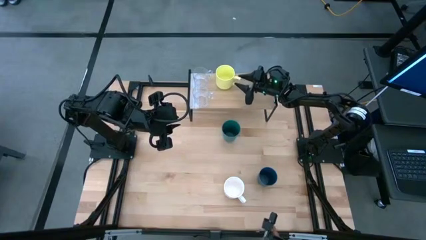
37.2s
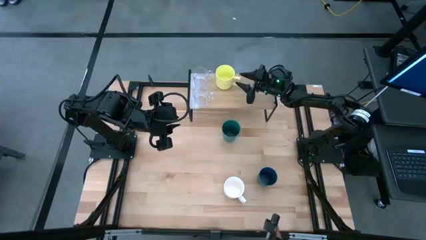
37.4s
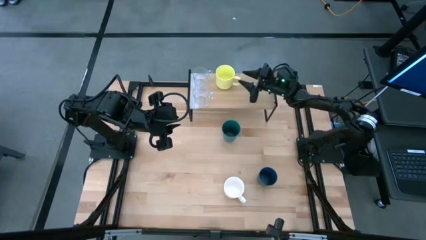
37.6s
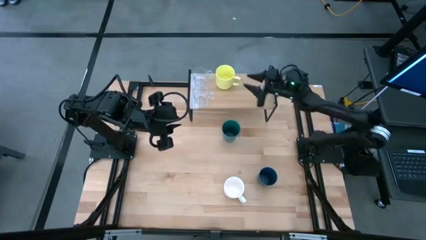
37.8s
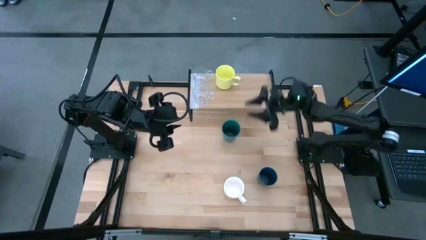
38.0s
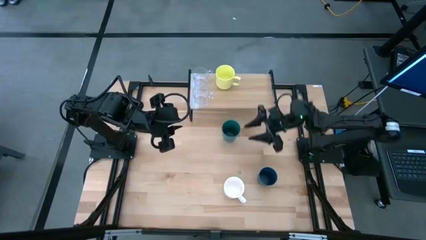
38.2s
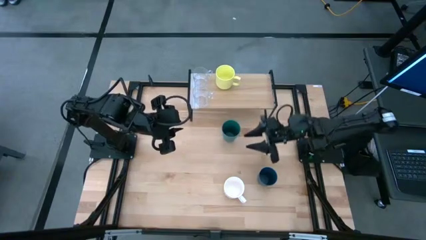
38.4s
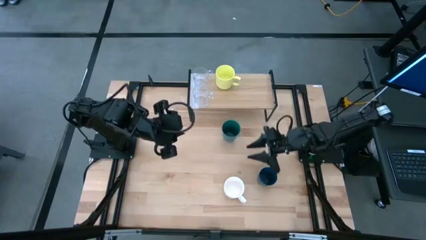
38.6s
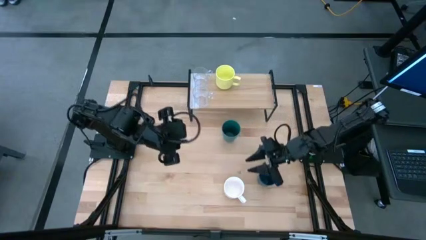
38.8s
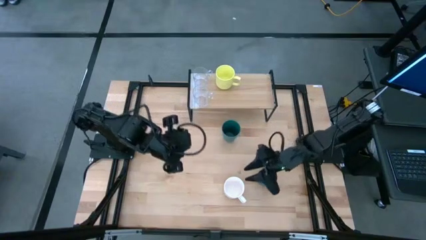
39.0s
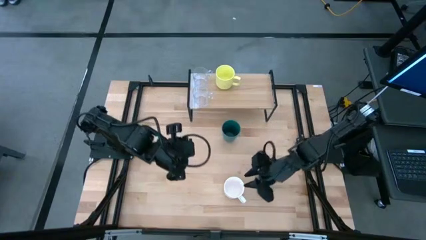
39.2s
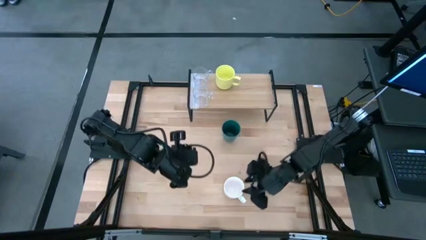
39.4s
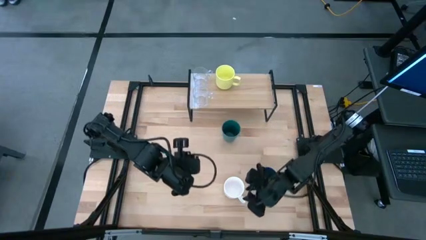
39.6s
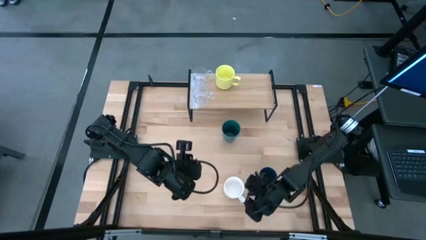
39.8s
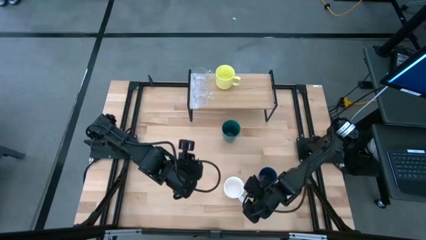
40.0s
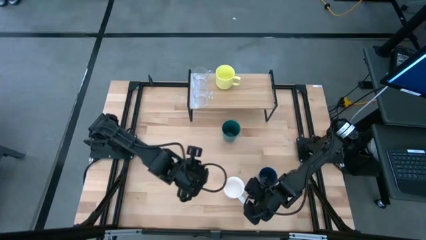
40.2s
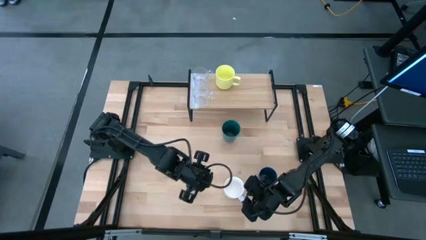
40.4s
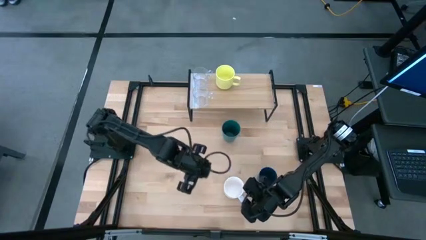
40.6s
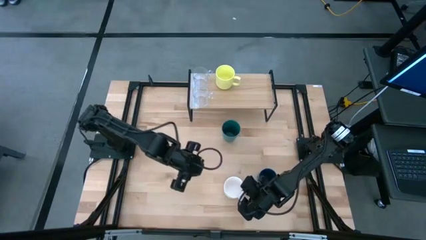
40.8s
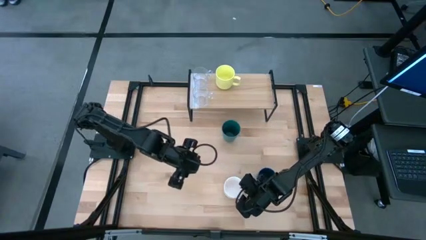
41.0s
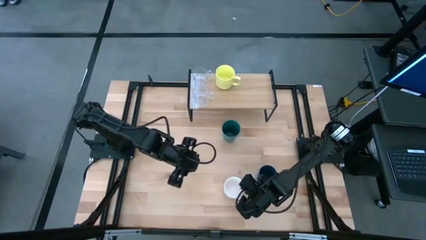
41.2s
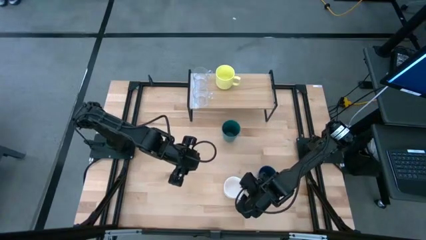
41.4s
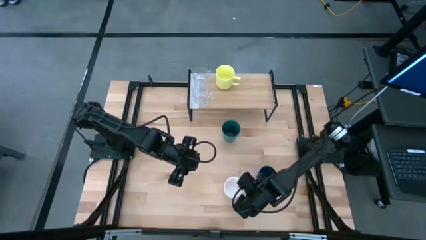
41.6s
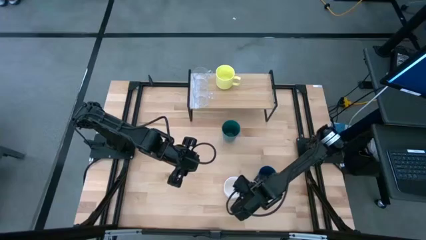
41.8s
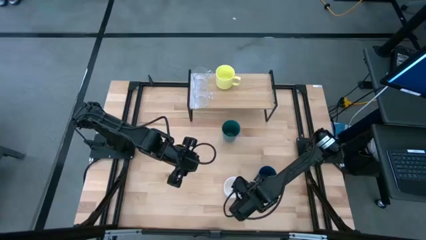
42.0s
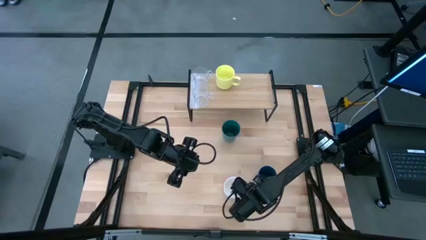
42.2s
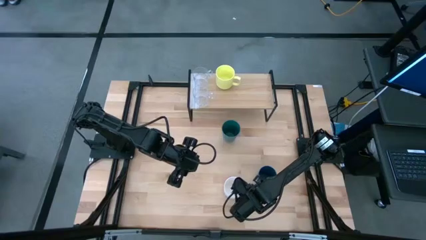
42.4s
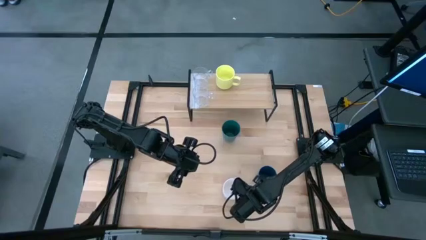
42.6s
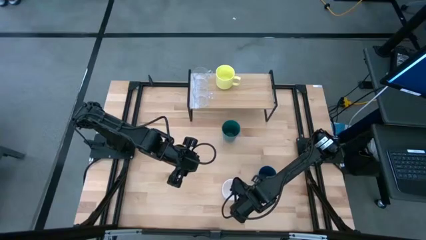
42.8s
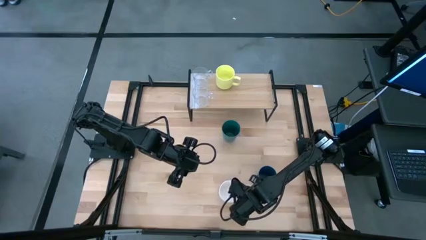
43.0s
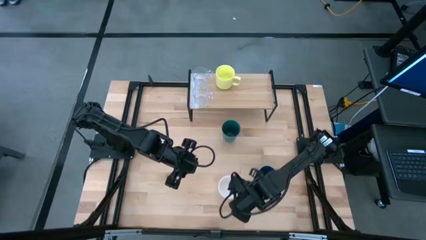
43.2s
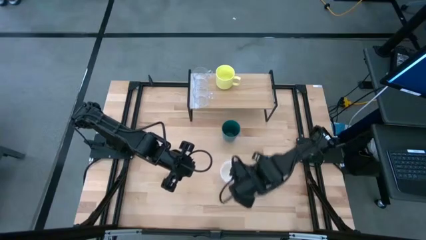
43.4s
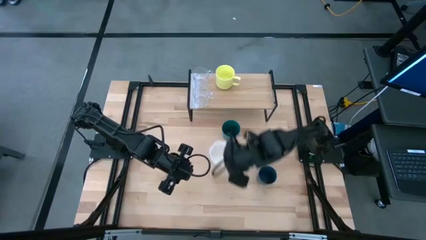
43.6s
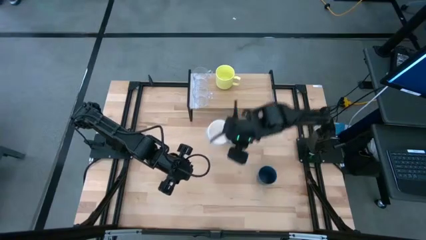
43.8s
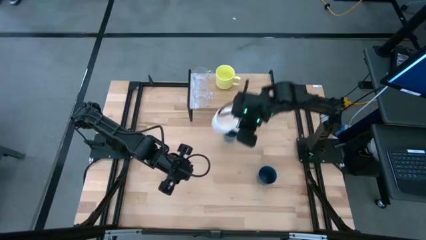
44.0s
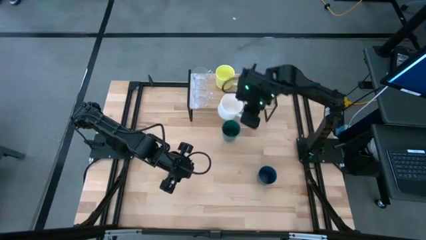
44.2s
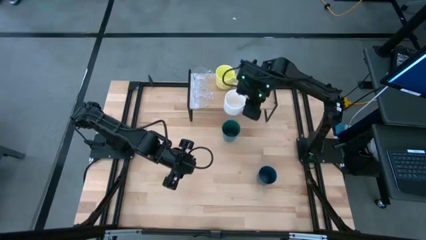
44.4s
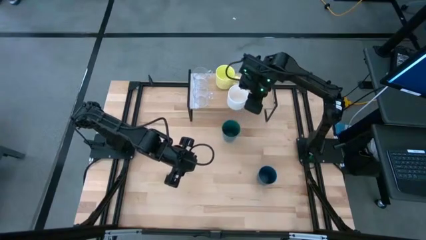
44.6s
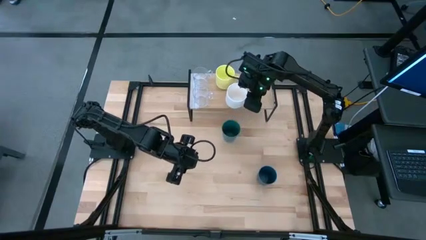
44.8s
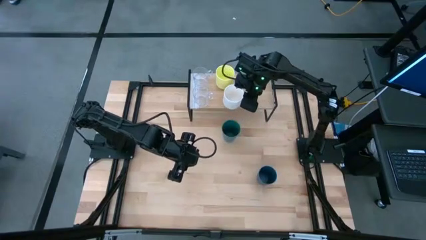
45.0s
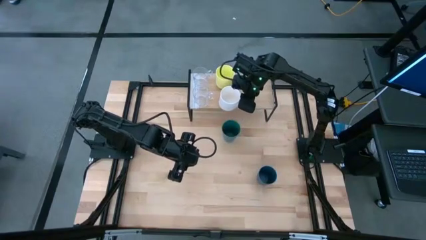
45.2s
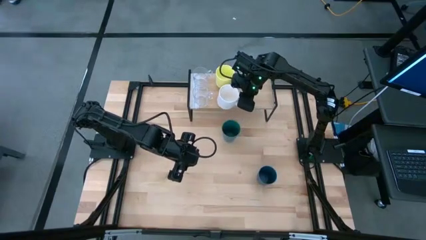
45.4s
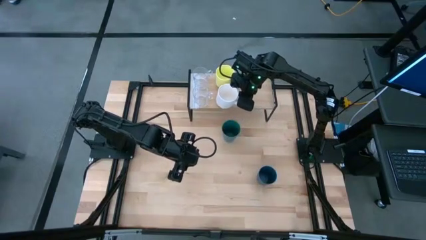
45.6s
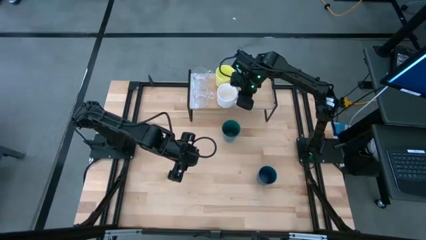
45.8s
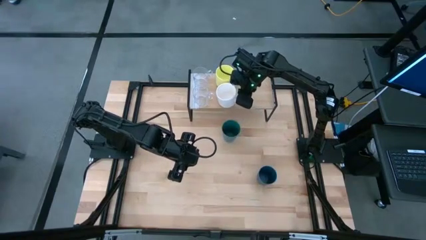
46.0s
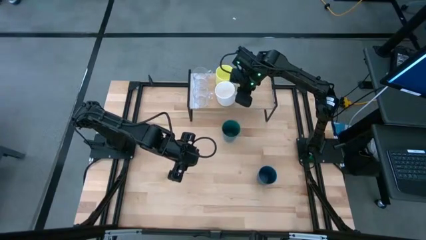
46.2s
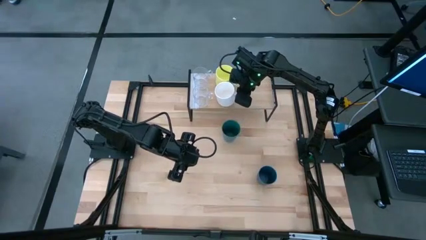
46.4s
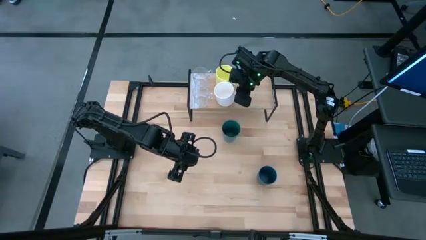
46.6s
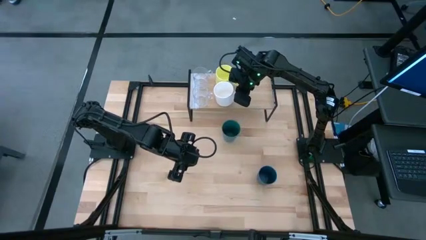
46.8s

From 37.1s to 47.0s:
Task: Stack small to large cups/mugs on shelf
Put the white mug on the shelf

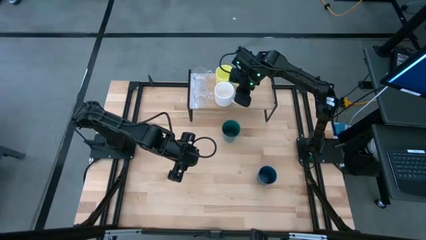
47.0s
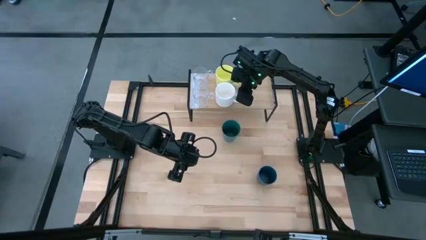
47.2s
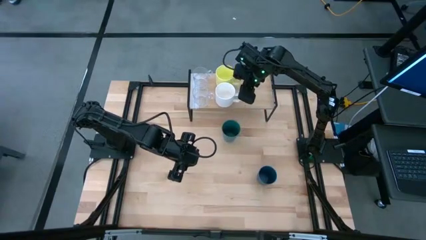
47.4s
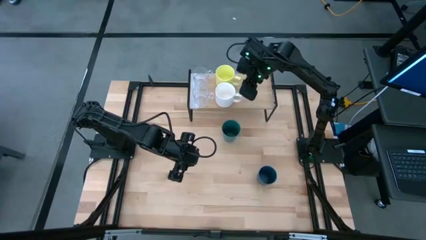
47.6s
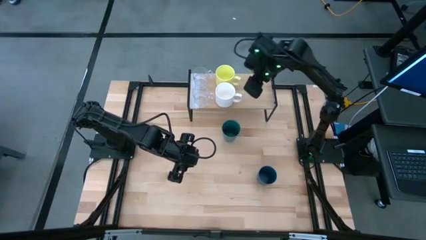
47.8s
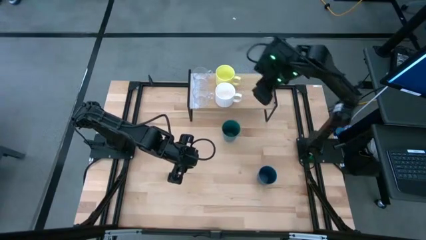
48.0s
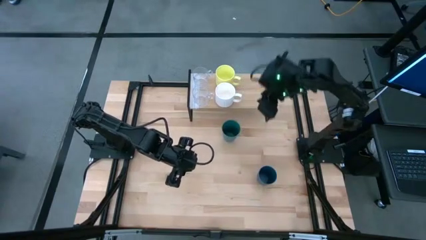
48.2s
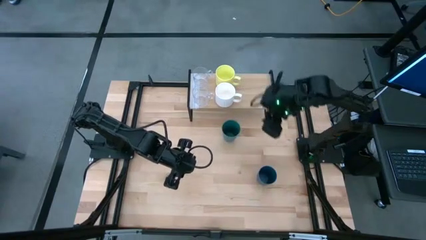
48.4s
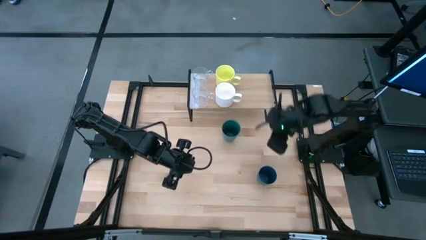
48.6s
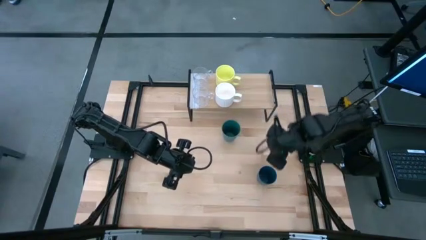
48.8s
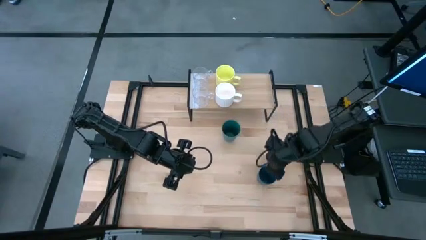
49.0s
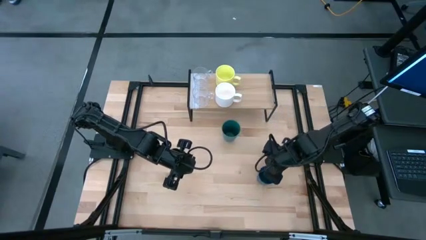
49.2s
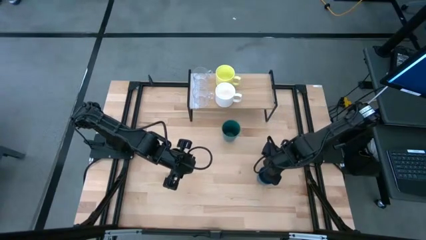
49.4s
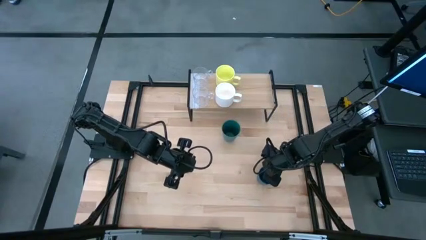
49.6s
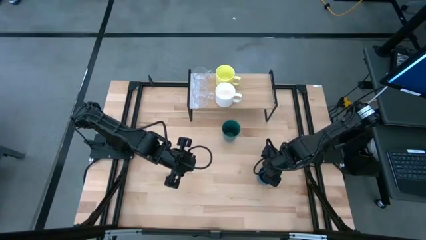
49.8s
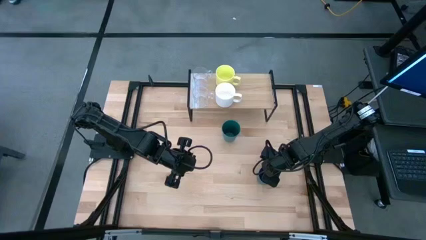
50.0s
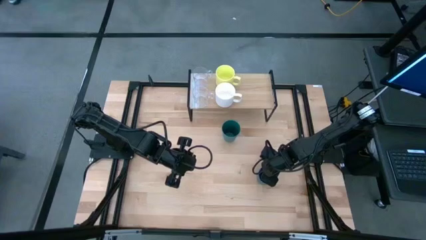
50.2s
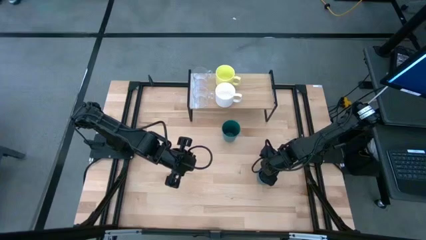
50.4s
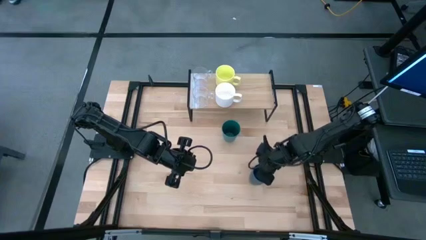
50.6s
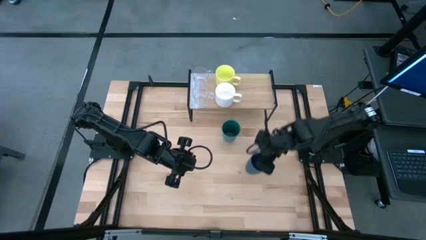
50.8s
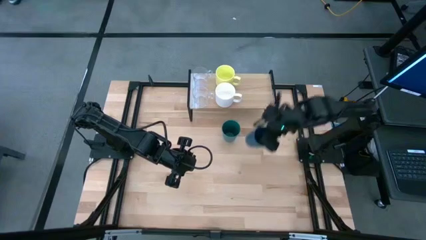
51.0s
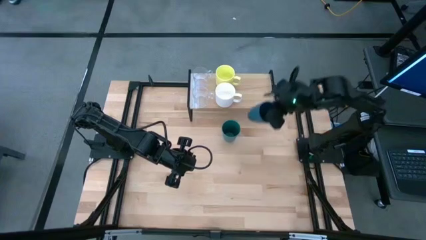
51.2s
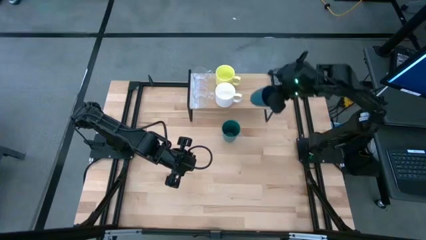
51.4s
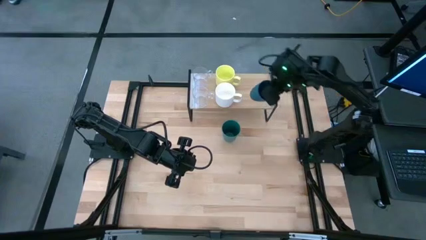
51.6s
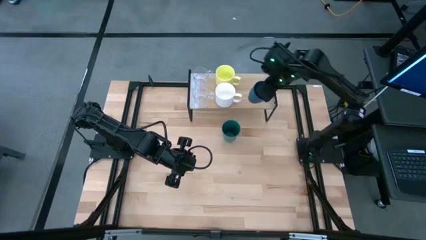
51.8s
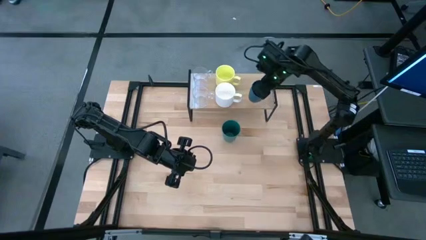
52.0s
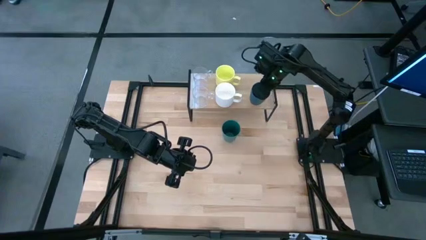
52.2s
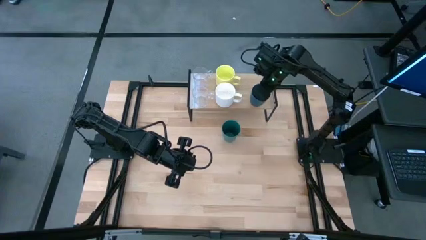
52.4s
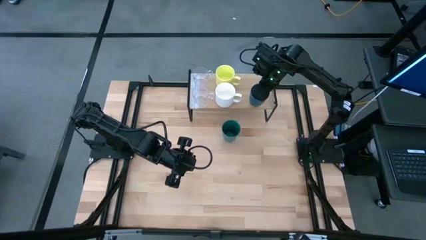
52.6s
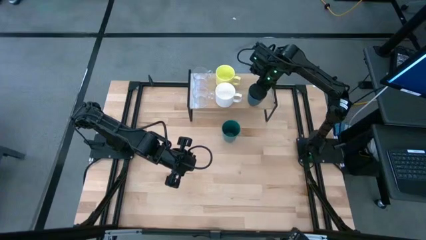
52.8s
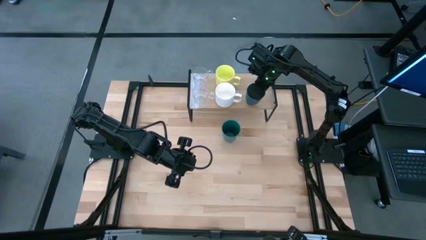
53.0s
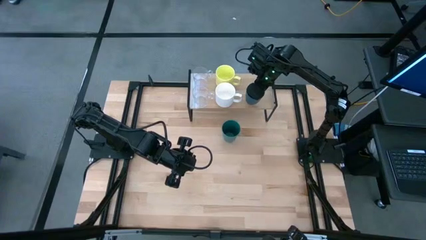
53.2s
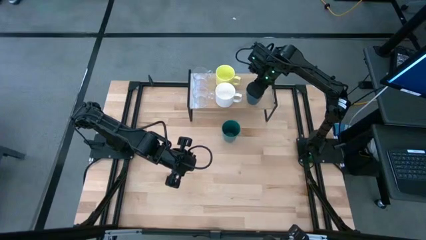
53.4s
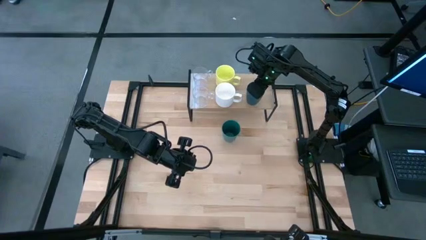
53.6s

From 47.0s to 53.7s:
Put the blue cup on the shelf
